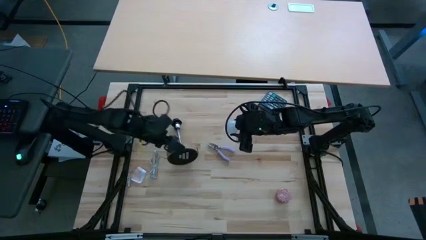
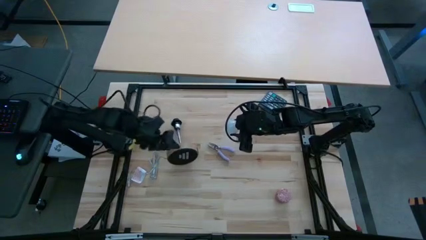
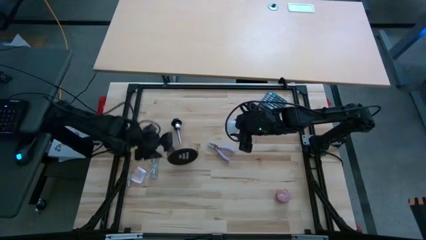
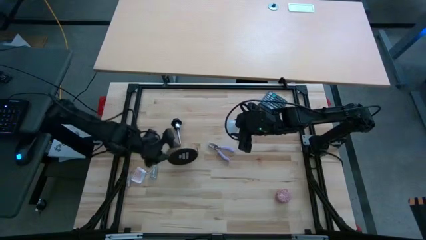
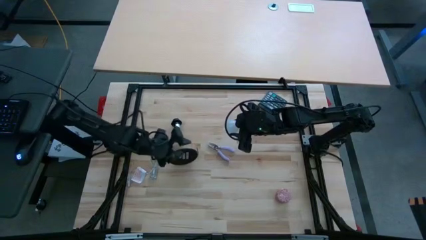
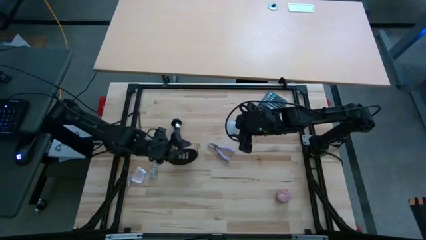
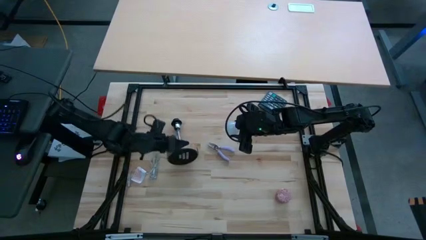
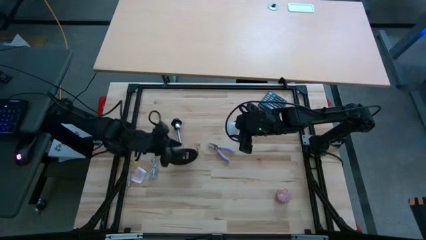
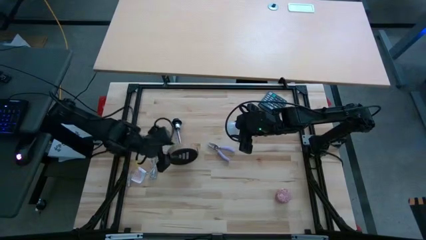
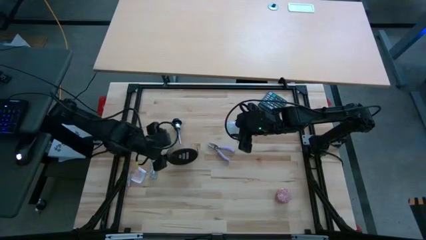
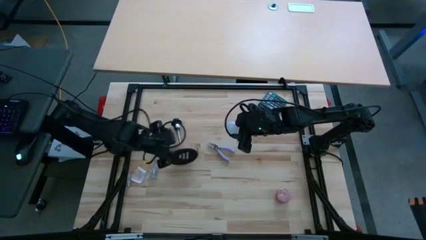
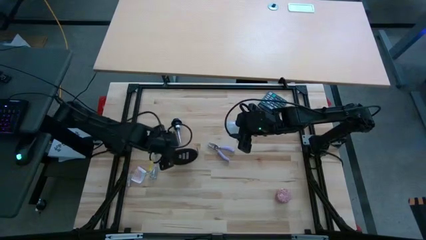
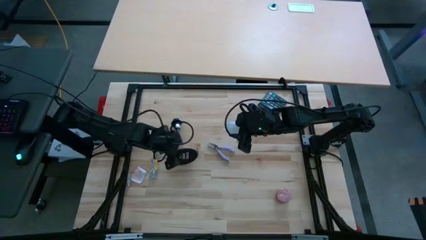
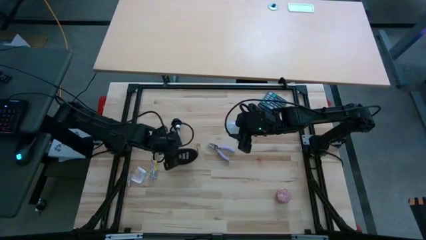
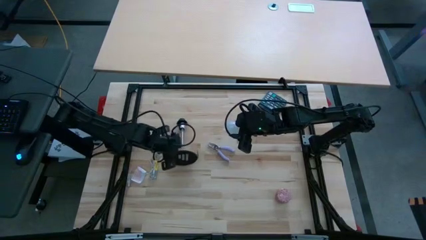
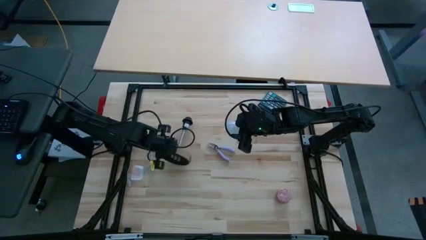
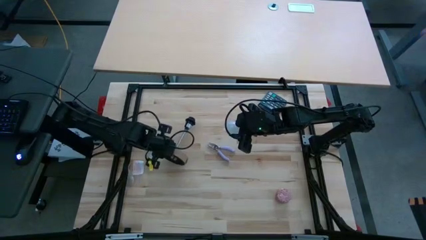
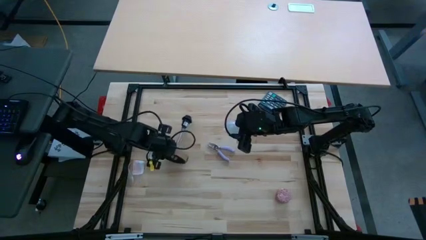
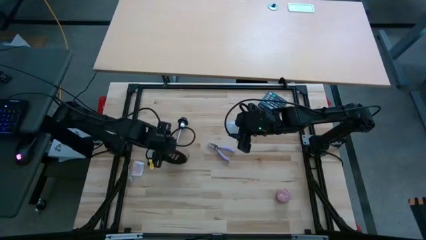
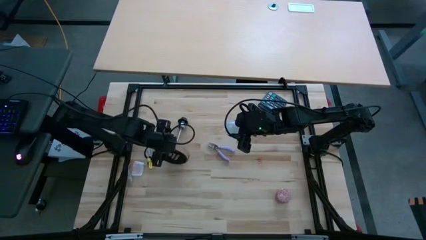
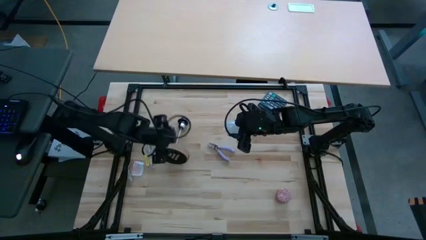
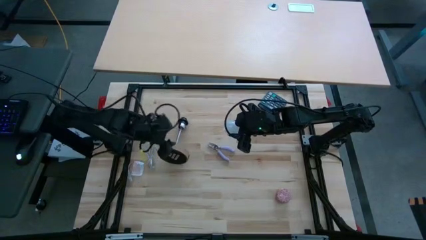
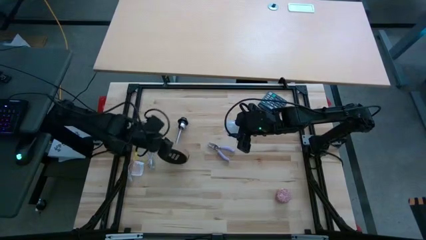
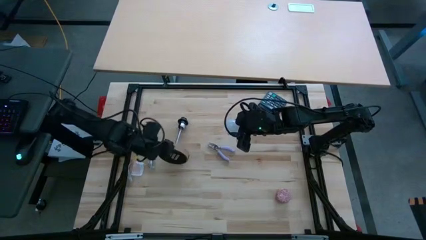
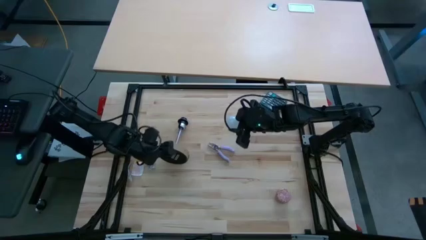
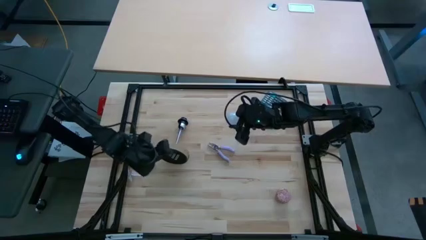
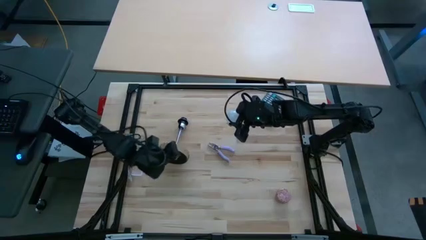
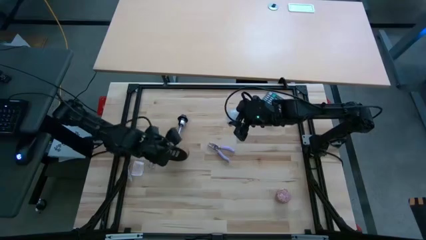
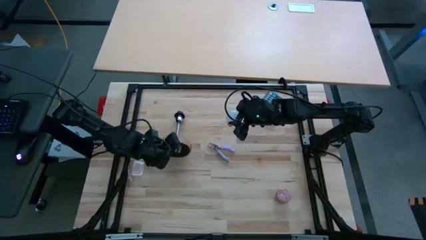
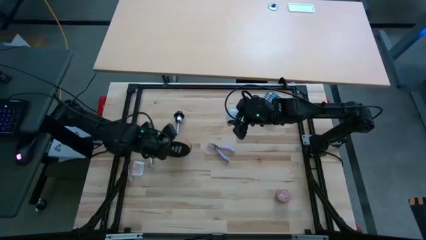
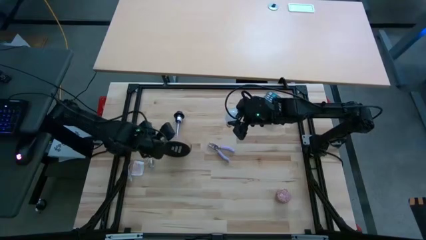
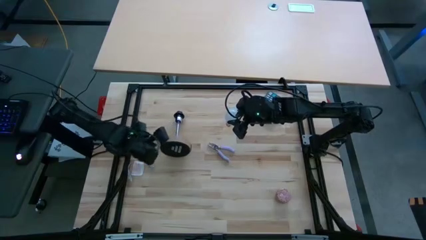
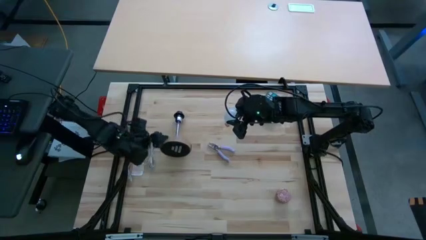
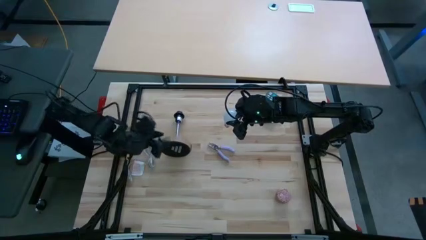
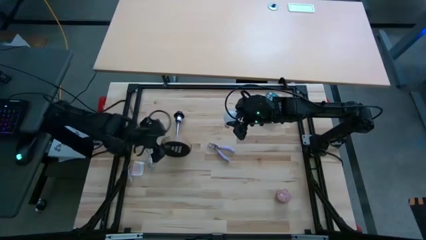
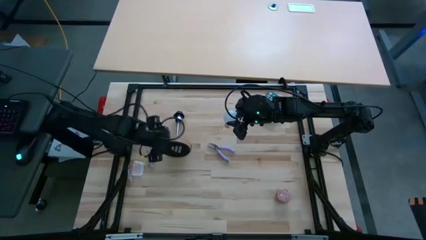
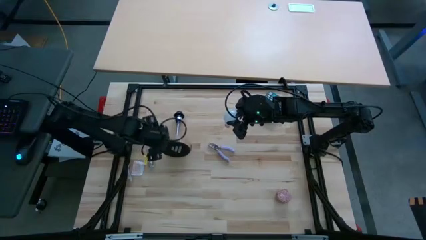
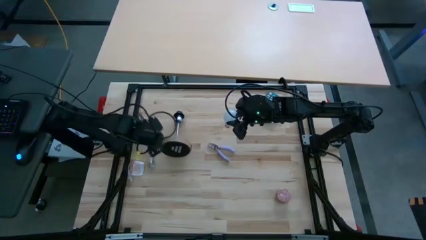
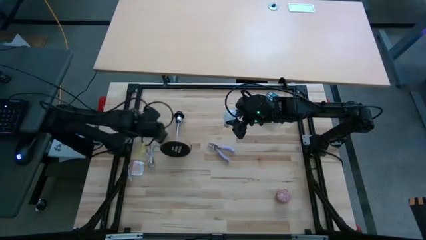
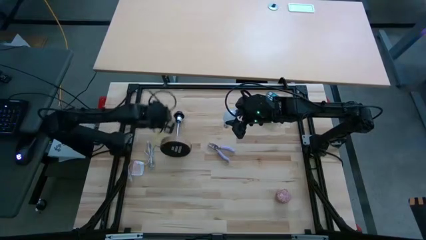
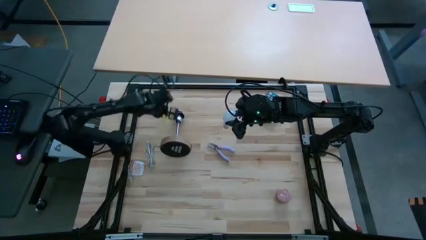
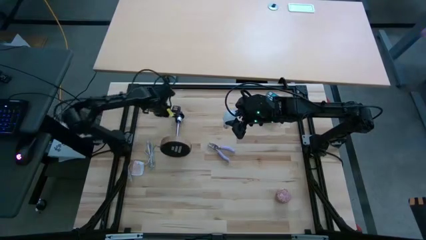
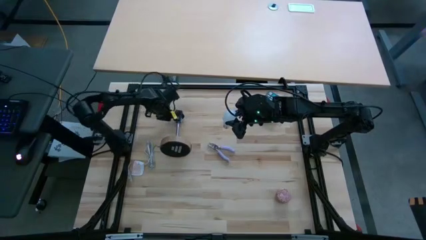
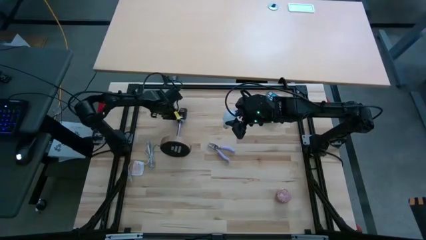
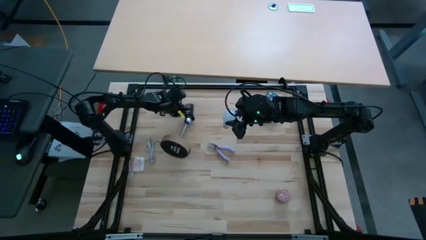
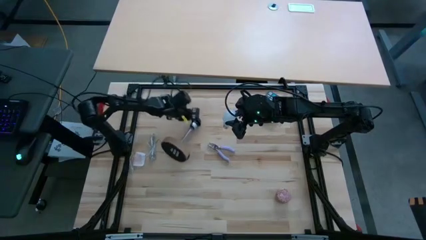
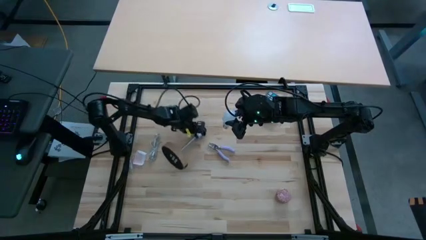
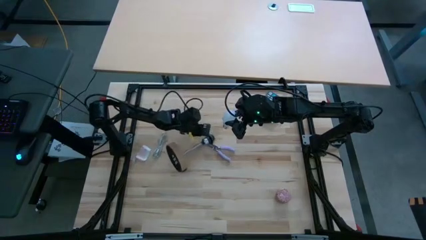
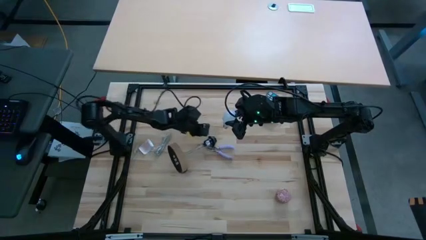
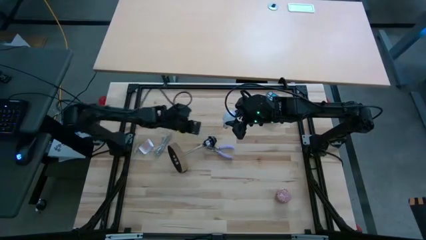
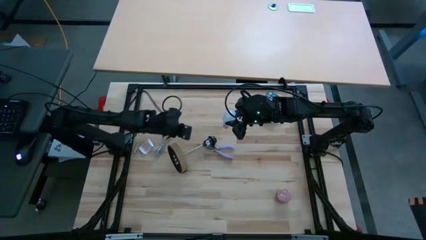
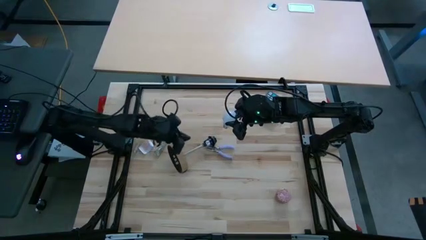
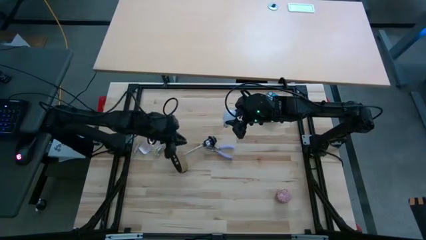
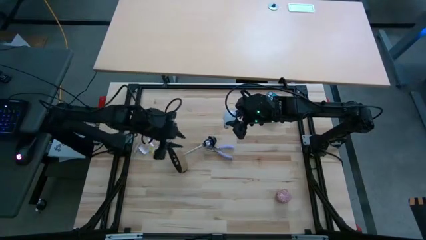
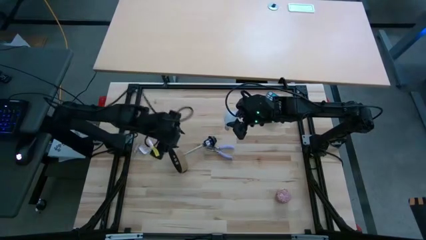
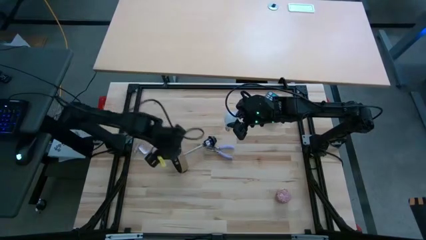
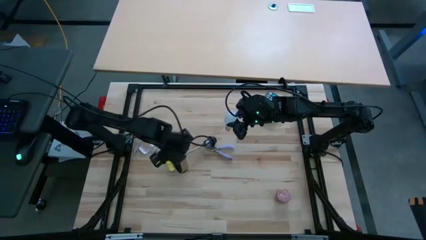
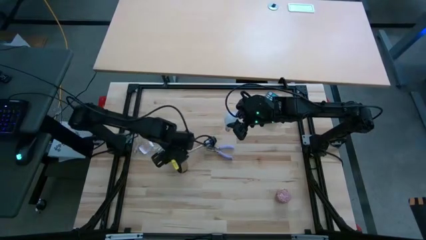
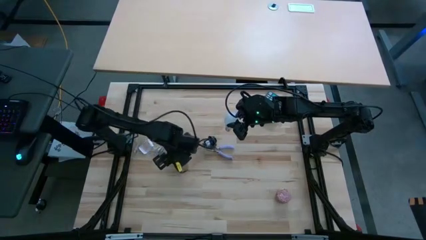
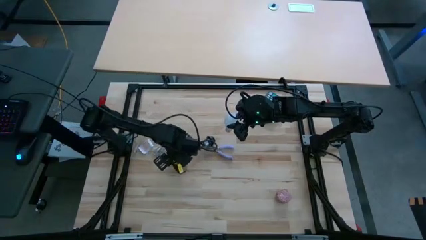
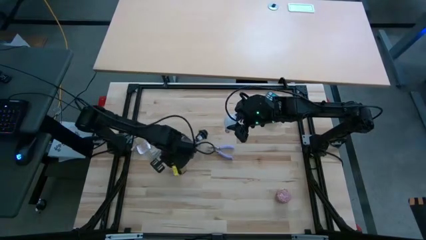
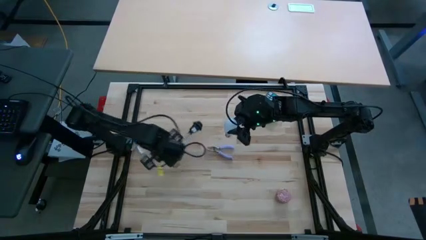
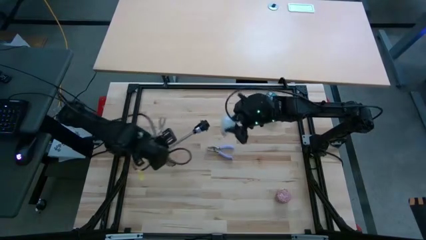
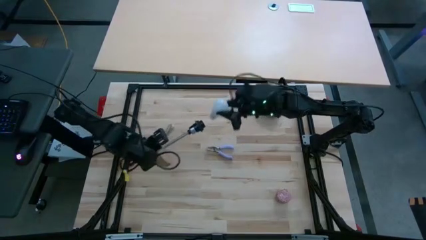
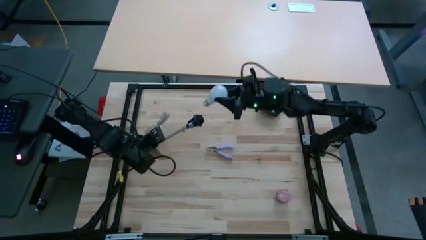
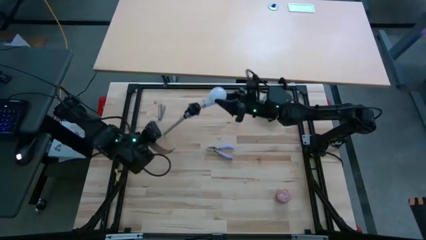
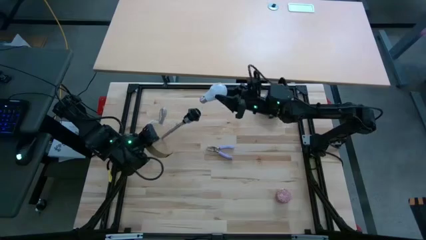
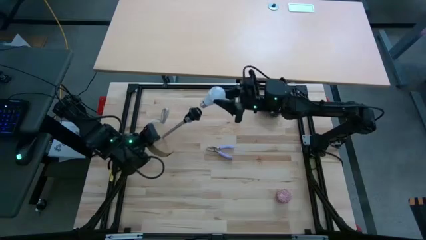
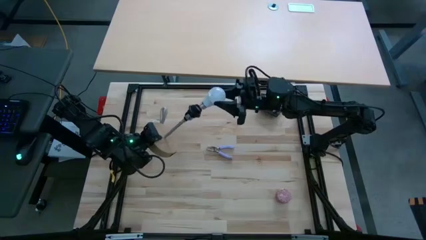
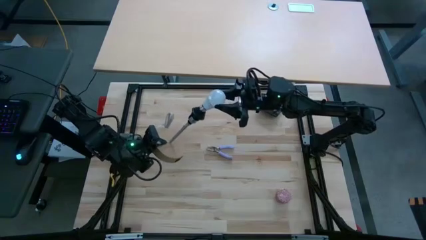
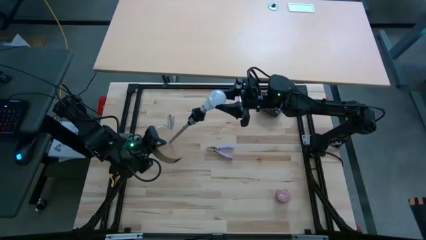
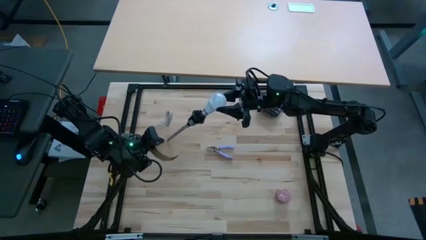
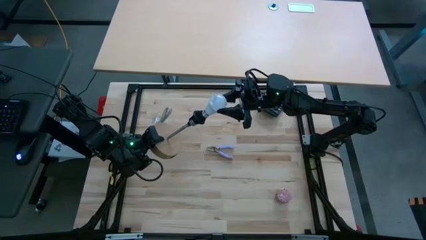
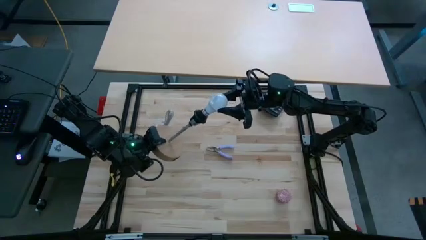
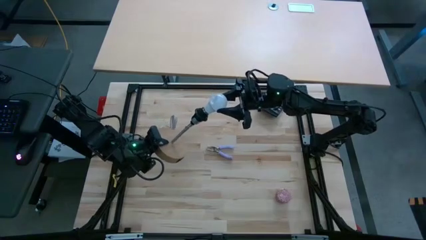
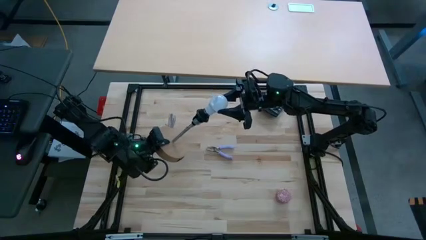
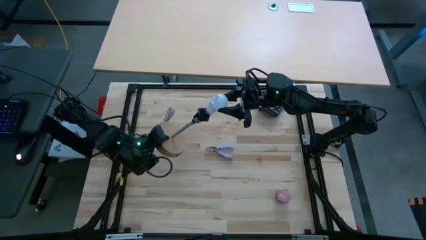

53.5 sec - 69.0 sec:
Task: Screw lightbulb
Insert the light bulb into the lamp socket

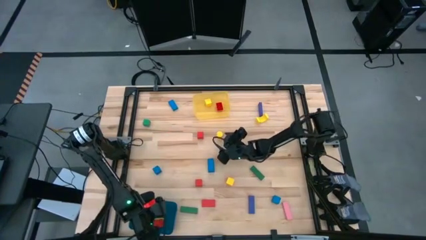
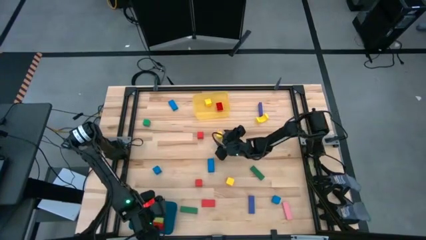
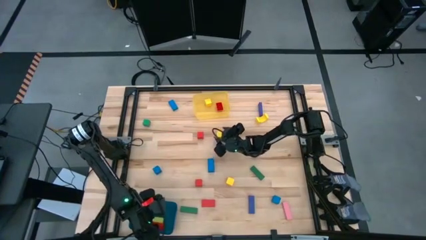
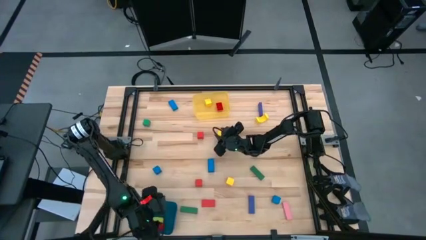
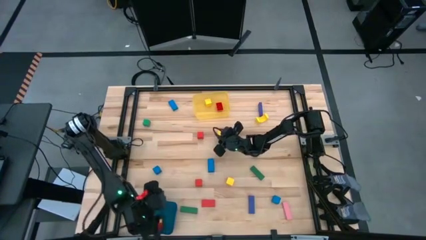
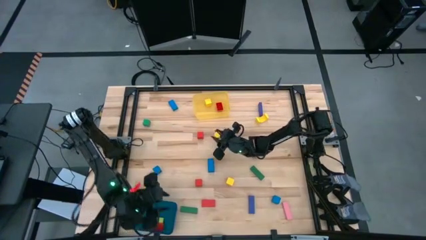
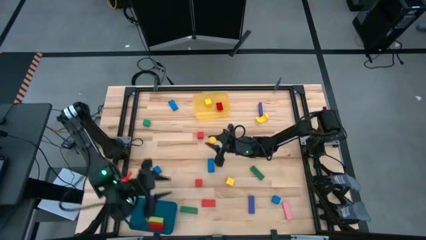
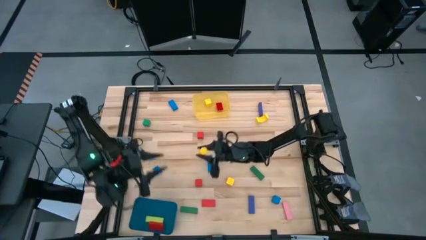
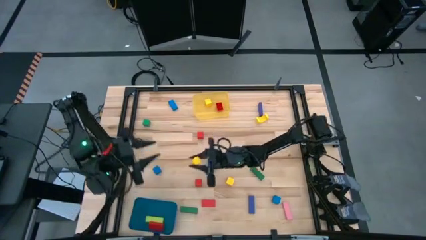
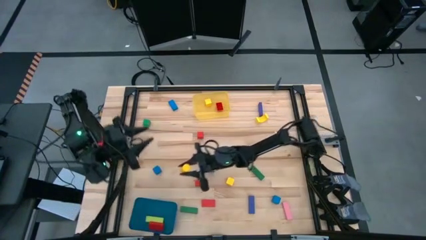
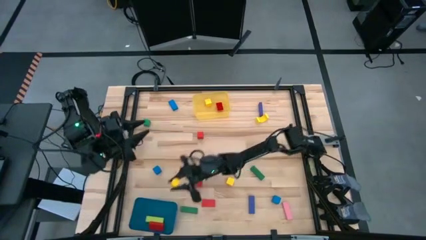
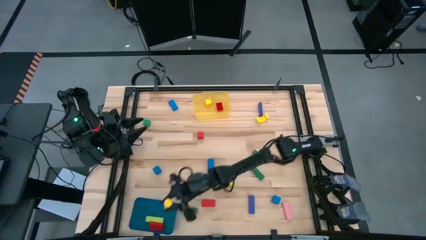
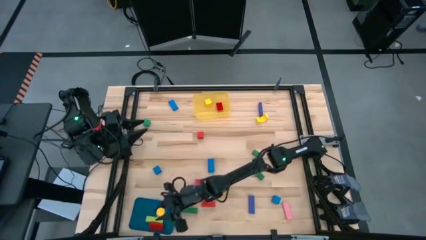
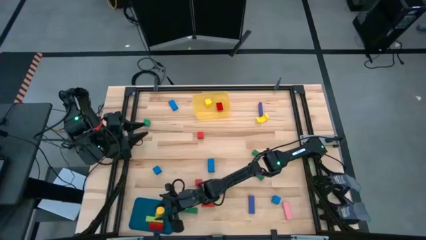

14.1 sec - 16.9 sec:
Task: Sort blocks by size
Put the yellow cylindrical block into the blue bin
